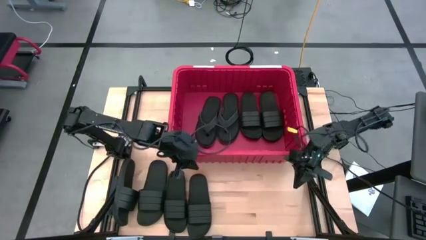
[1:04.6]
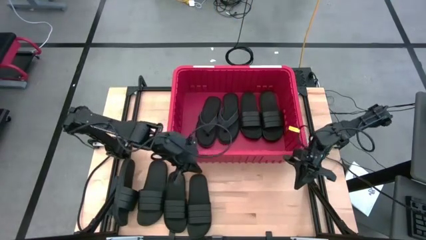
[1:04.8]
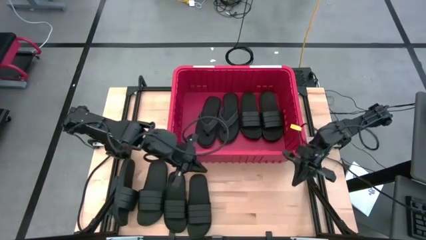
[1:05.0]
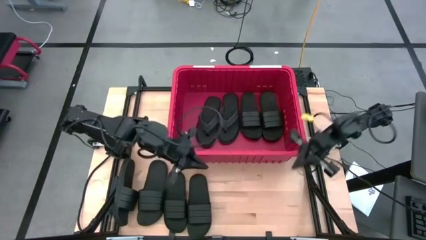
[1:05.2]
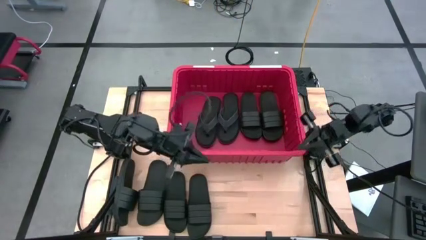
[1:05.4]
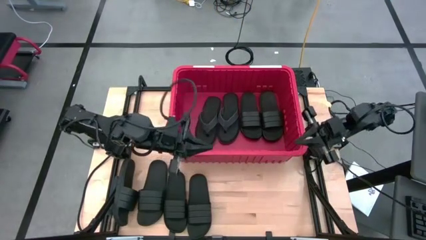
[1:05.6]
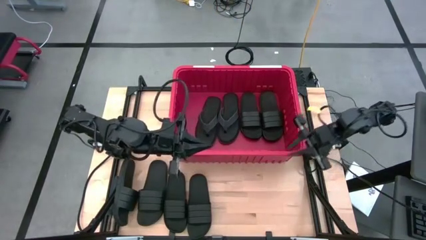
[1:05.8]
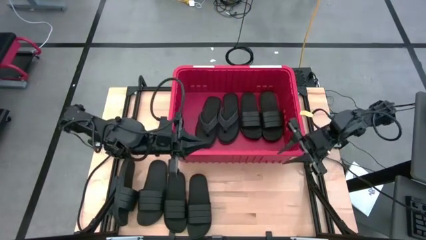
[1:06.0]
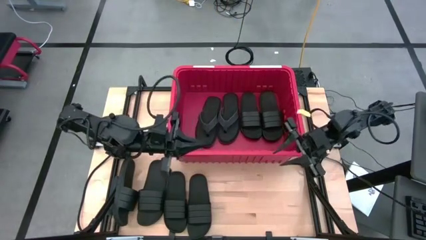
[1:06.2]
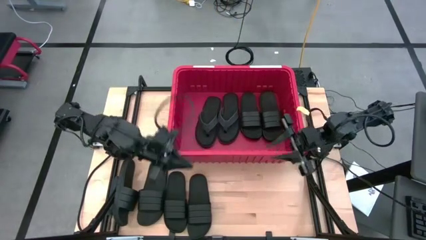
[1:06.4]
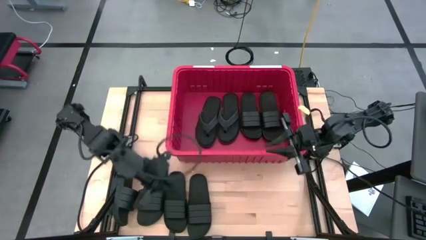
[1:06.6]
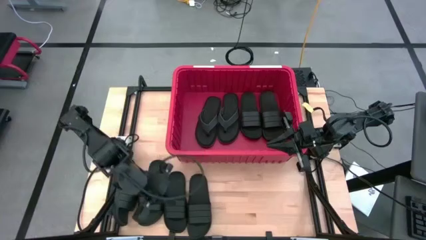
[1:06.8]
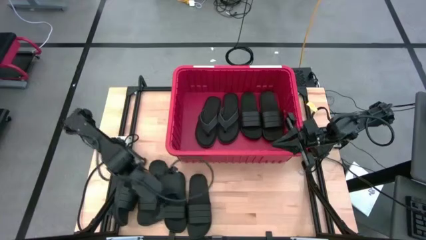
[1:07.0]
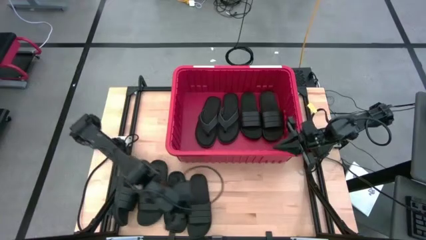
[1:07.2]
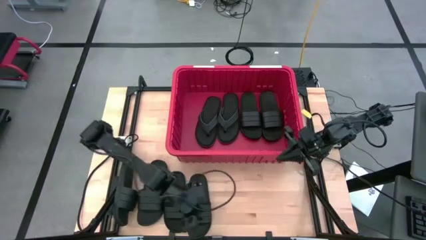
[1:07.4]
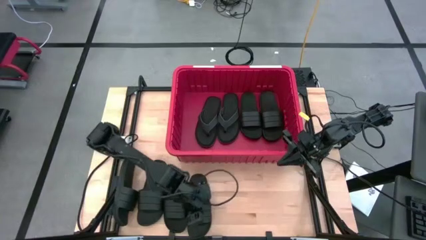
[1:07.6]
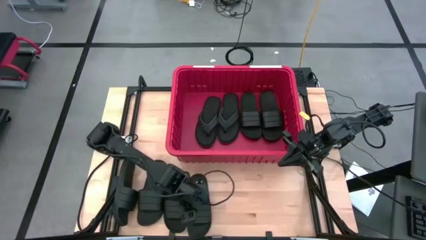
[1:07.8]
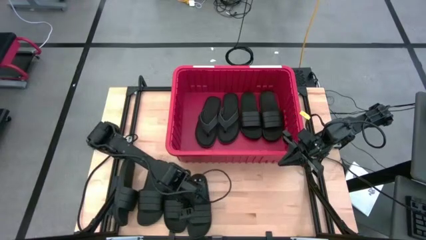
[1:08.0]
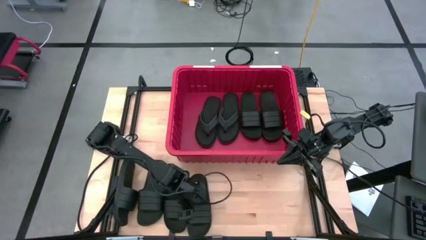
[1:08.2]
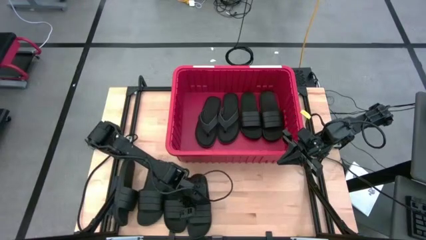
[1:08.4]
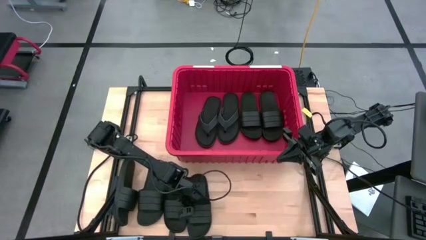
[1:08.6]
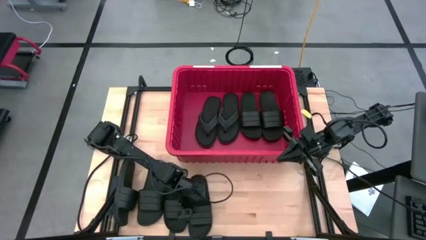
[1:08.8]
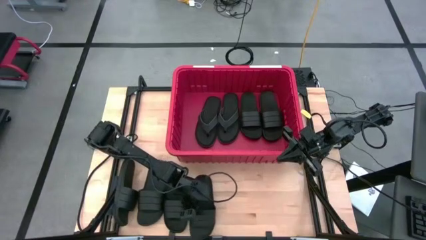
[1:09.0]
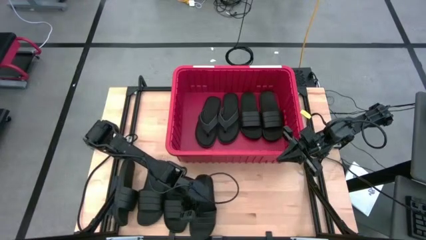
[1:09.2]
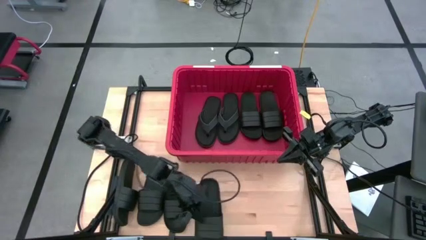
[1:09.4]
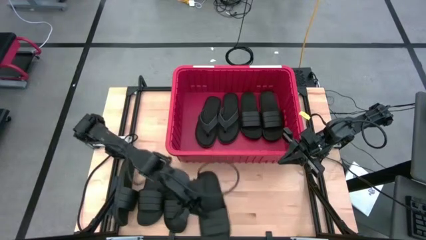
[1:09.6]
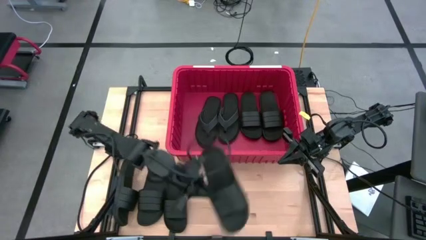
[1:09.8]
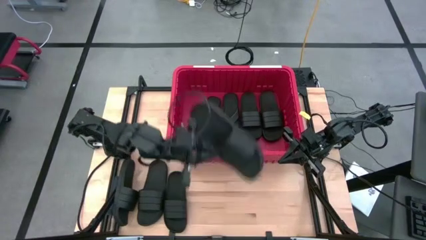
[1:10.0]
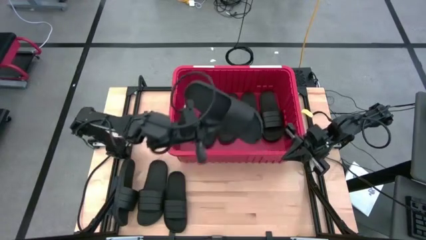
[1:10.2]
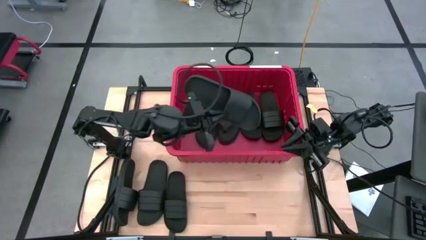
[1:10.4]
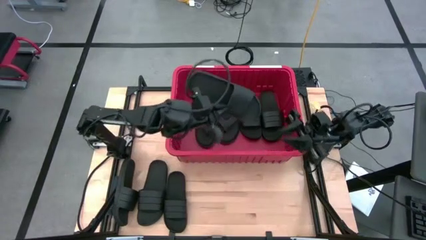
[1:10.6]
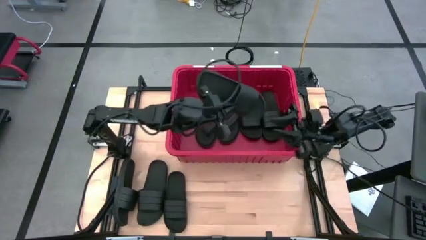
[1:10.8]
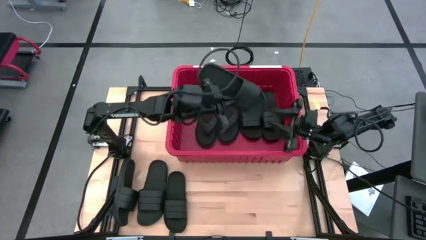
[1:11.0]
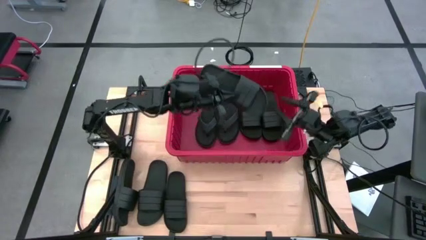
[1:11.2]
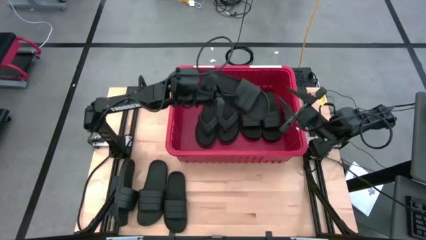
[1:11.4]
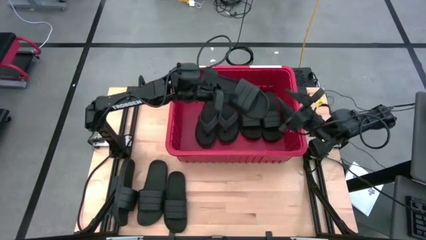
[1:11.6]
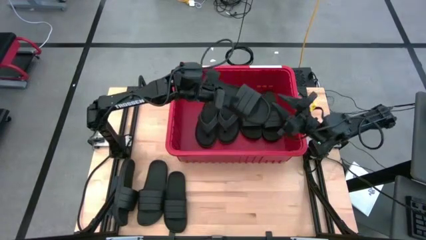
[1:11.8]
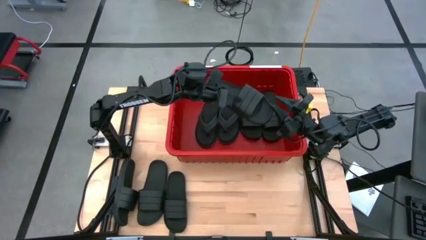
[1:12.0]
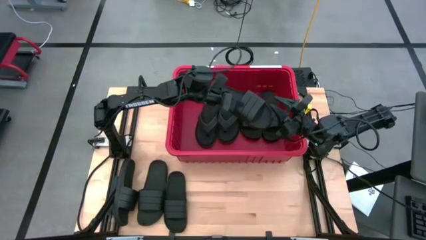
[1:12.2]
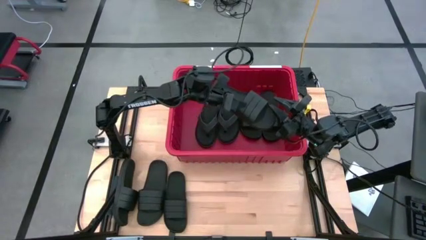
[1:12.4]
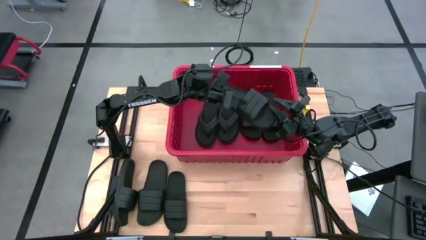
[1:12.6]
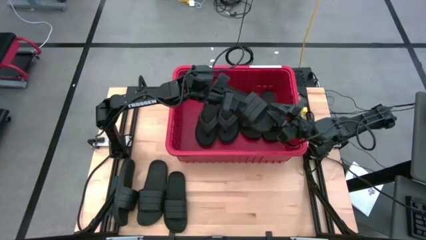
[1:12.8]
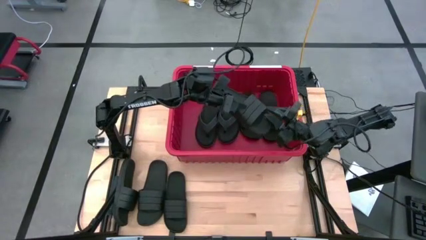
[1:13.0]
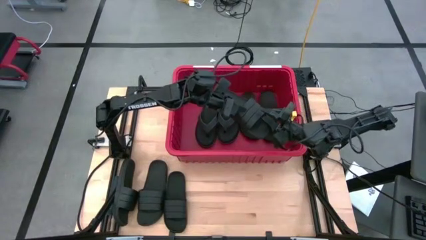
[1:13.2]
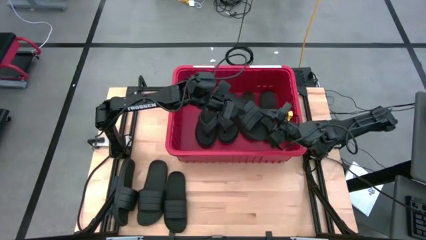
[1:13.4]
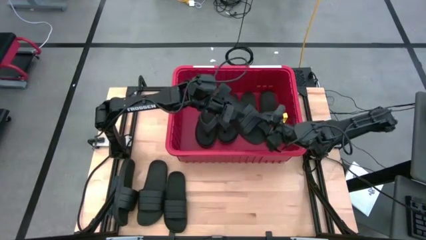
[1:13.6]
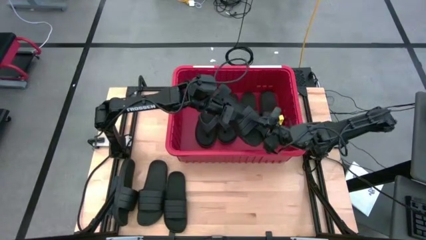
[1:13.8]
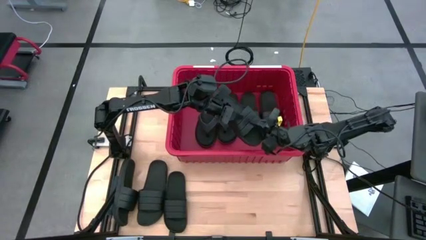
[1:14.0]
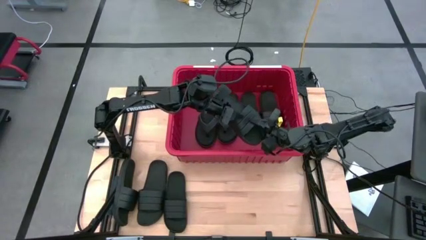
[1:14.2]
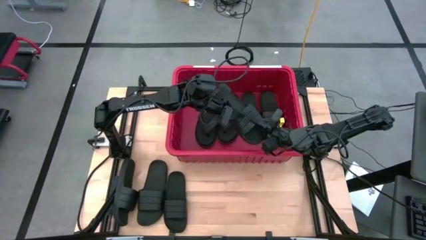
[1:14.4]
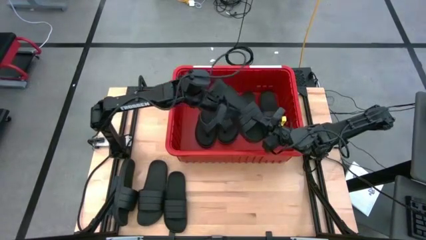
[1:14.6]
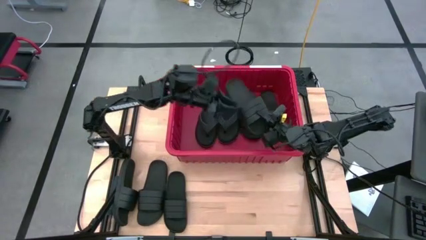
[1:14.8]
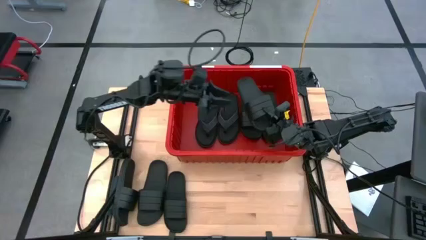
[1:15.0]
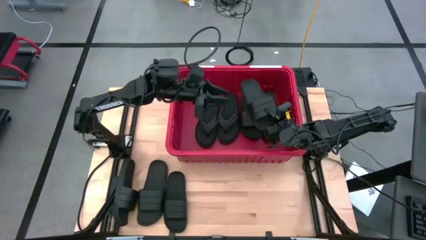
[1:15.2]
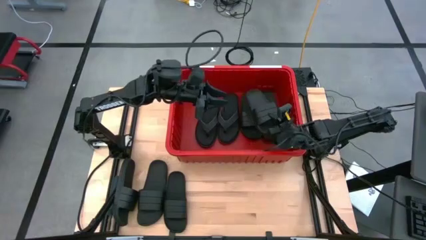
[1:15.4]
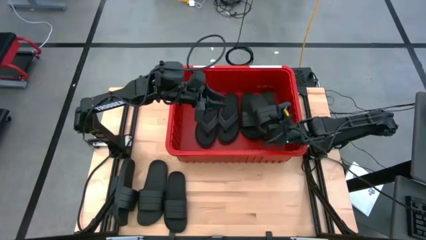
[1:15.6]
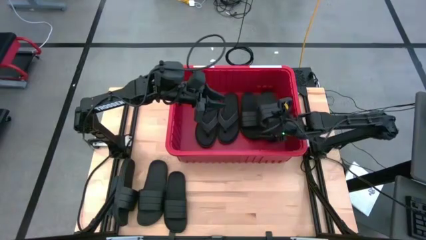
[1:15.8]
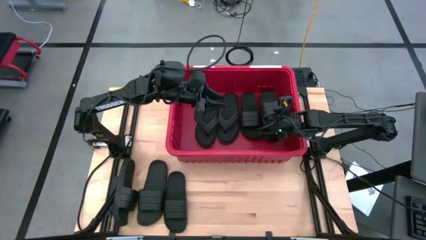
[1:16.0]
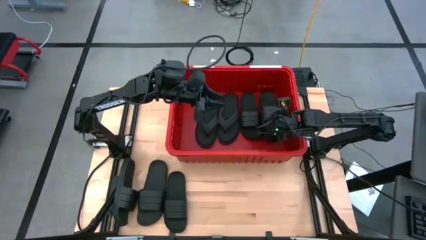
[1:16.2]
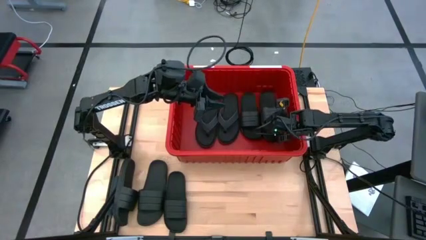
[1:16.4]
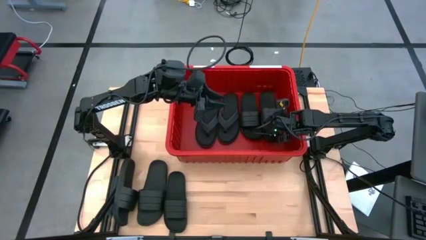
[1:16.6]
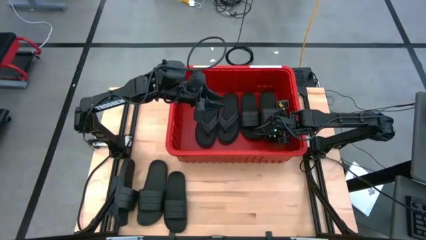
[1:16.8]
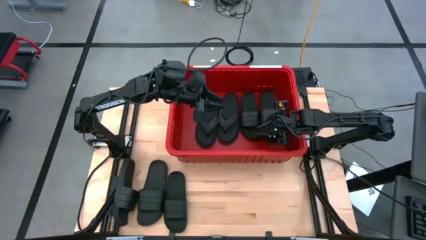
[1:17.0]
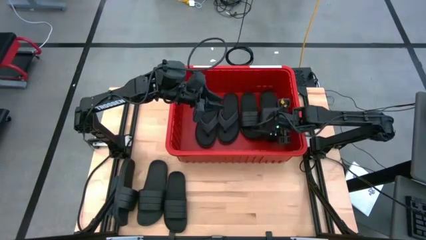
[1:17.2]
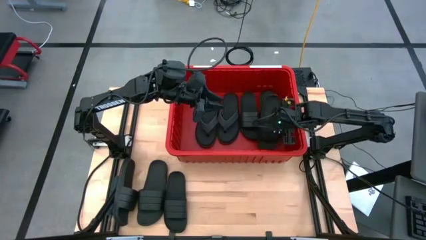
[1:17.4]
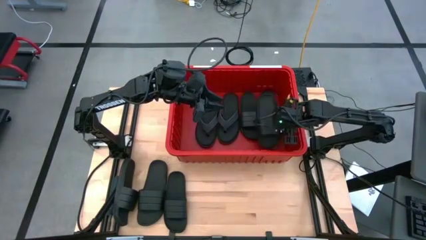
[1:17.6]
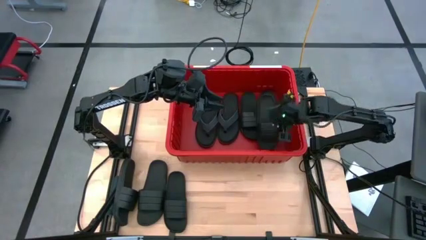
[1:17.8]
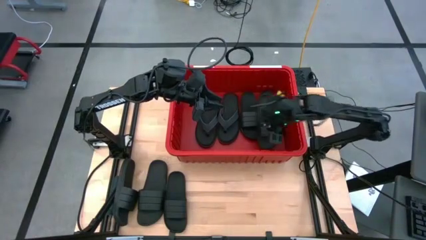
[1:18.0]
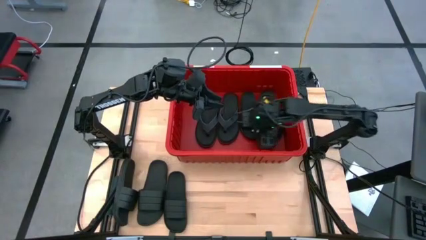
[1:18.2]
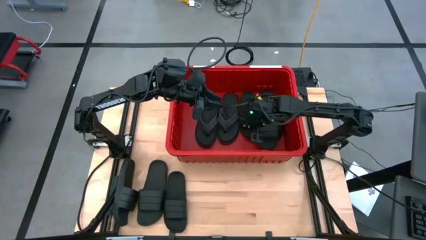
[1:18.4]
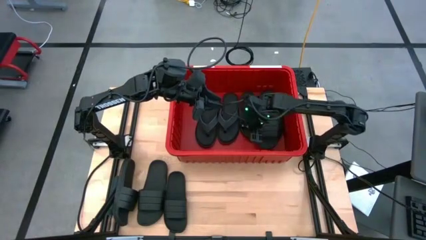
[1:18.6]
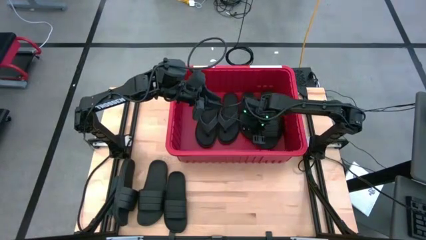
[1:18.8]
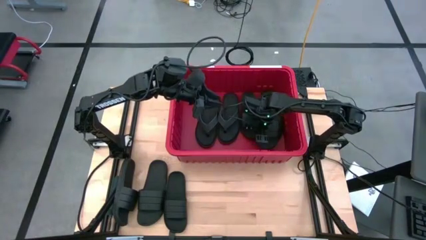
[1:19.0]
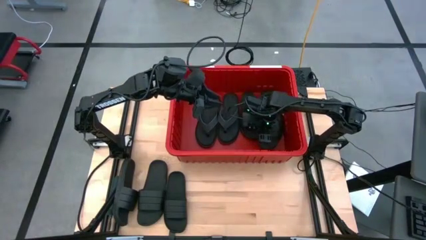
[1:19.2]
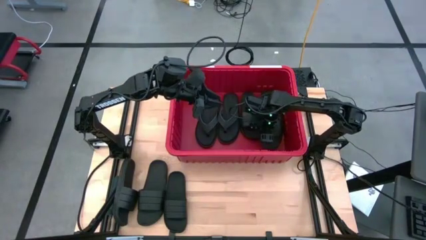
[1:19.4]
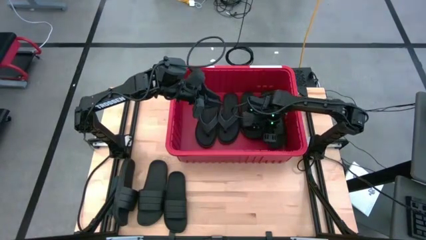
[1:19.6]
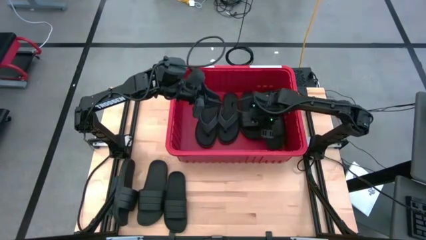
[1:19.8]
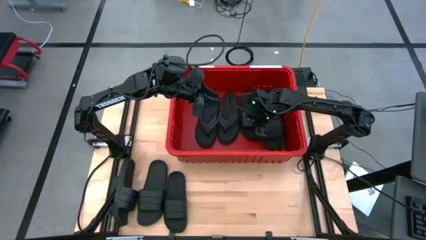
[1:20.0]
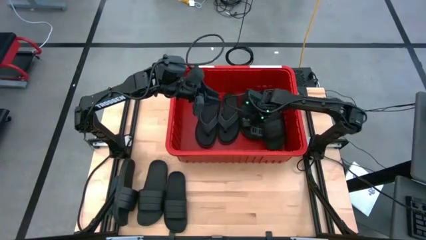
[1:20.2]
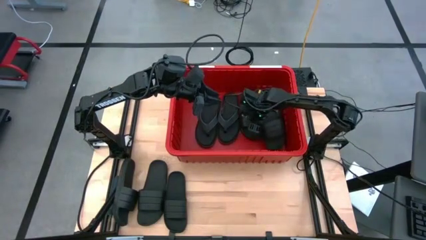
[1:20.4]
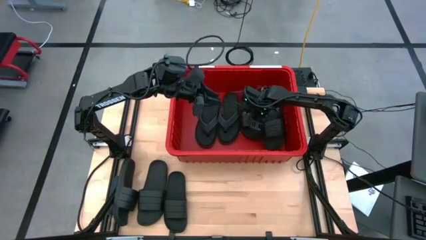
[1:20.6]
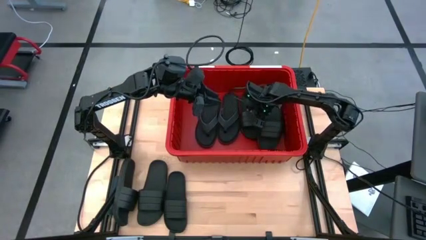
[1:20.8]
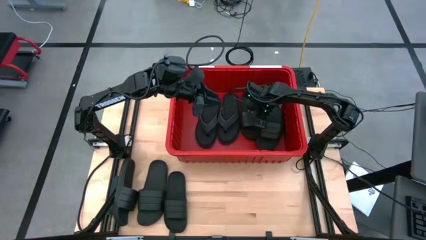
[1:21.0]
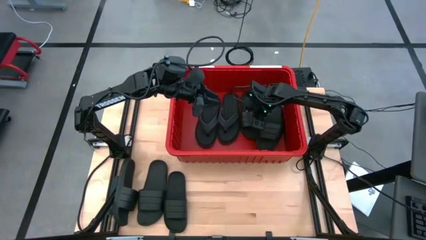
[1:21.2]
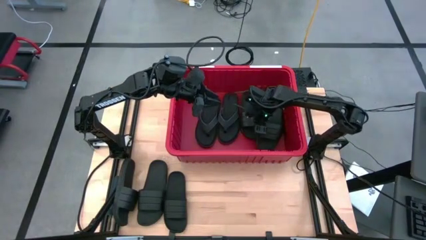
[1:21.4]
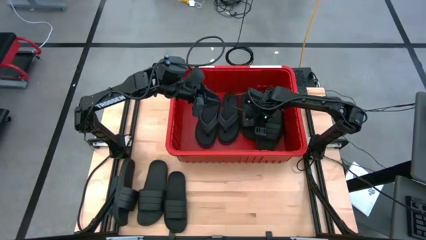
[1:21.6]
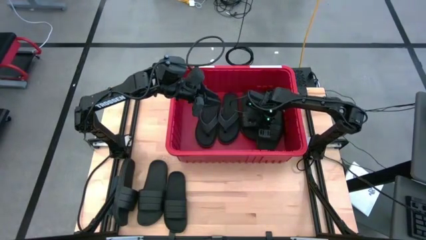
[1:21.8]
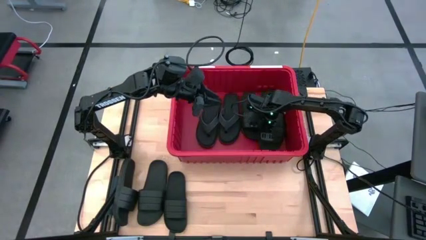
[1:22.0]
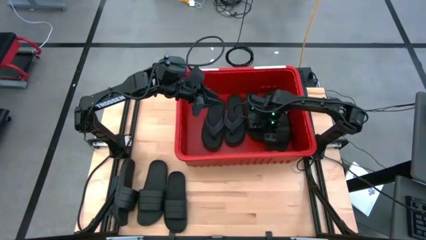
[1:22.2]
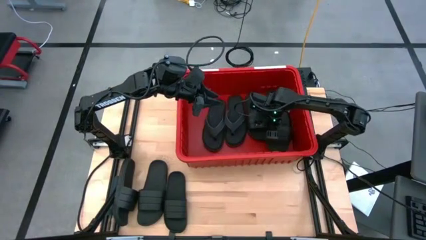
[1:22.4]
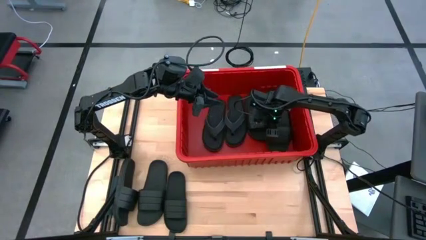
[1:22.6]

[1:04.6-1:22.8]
Task: Pick and place slides into bin
Put the black slide into the red bin
